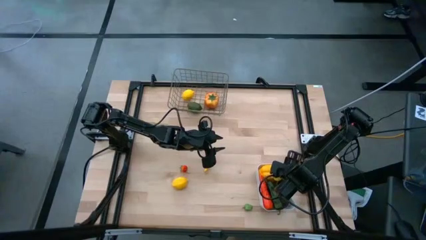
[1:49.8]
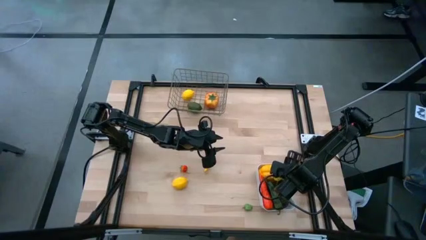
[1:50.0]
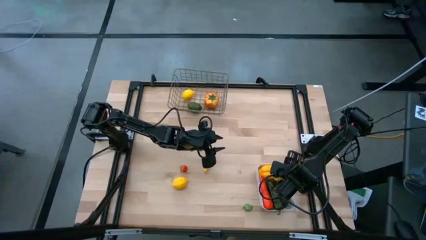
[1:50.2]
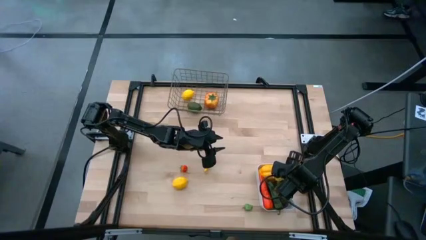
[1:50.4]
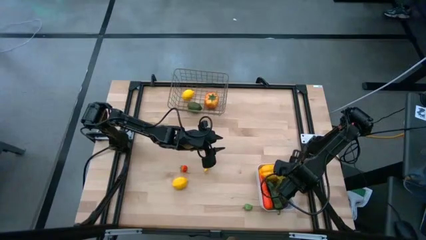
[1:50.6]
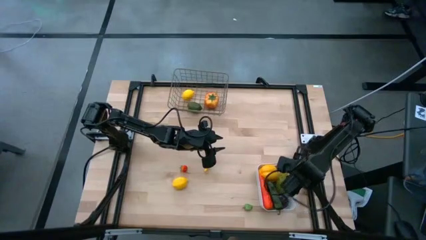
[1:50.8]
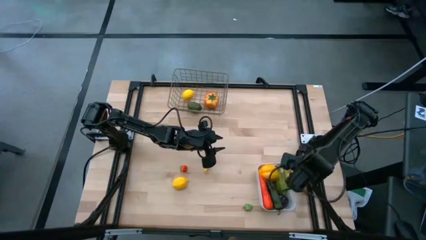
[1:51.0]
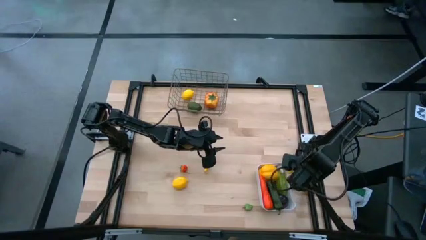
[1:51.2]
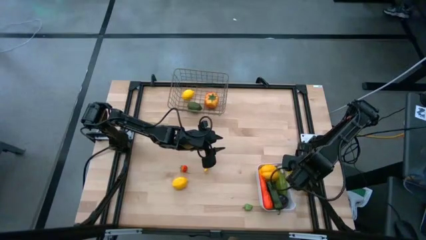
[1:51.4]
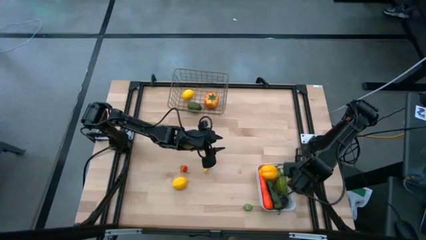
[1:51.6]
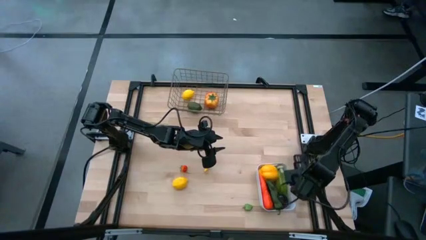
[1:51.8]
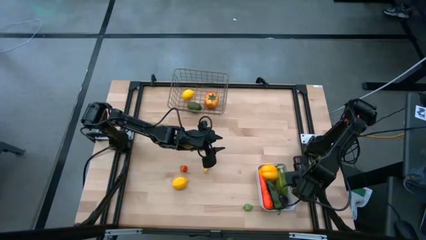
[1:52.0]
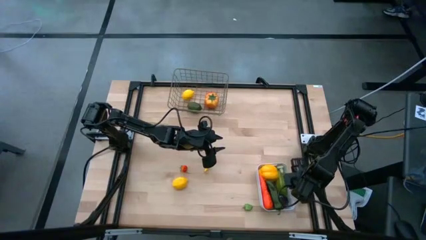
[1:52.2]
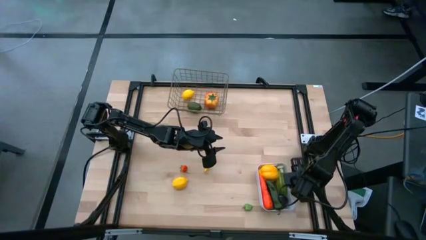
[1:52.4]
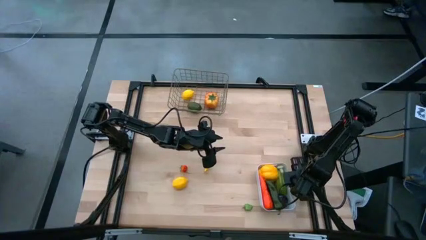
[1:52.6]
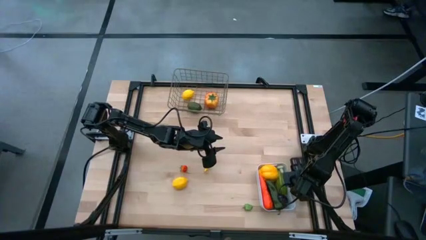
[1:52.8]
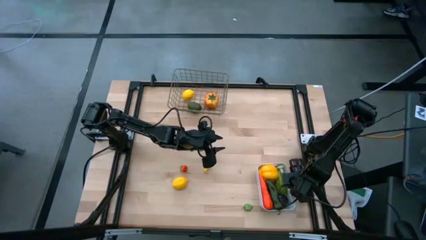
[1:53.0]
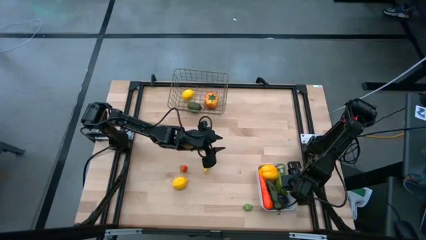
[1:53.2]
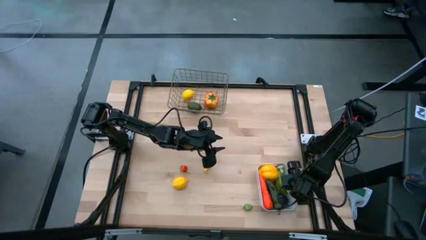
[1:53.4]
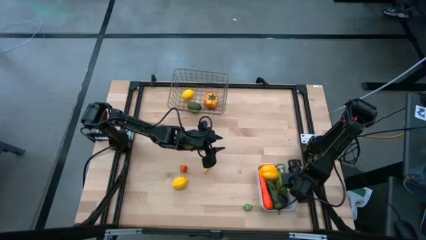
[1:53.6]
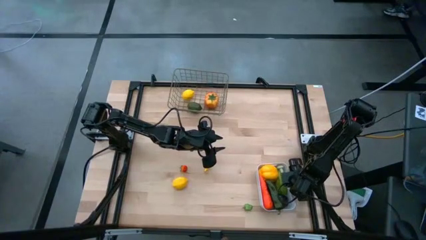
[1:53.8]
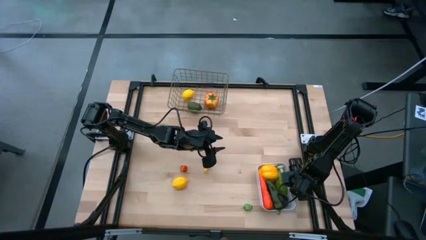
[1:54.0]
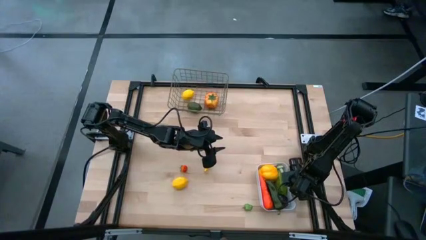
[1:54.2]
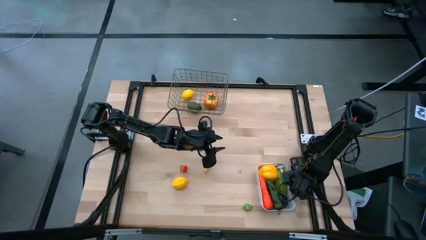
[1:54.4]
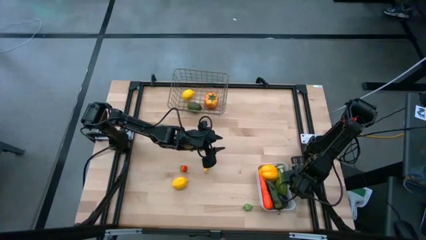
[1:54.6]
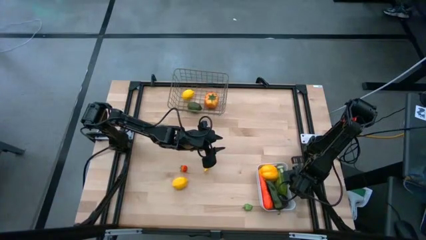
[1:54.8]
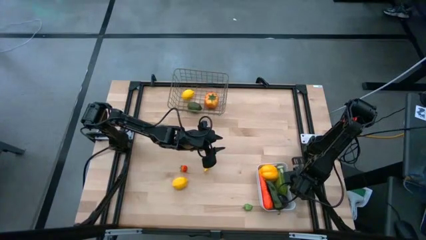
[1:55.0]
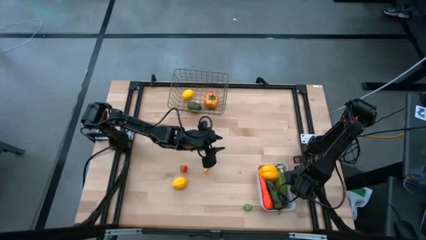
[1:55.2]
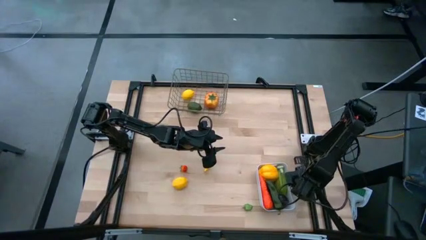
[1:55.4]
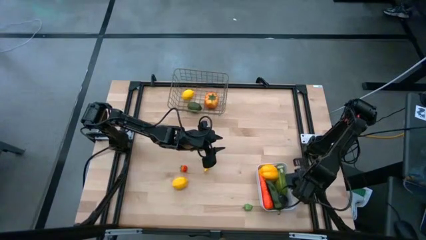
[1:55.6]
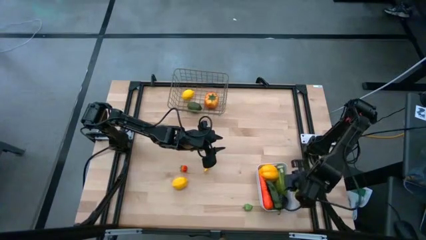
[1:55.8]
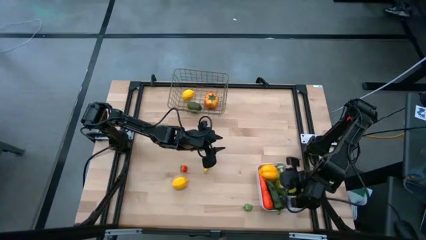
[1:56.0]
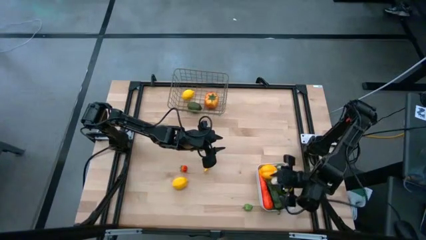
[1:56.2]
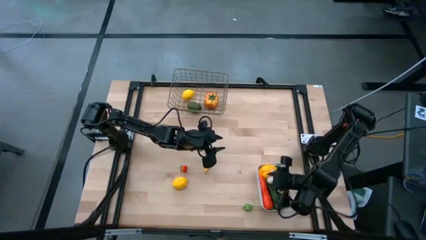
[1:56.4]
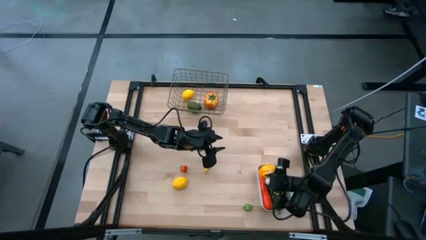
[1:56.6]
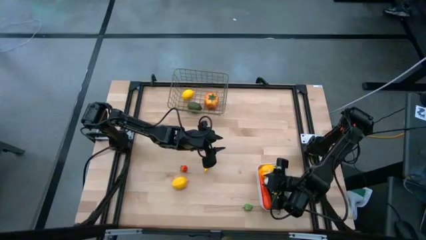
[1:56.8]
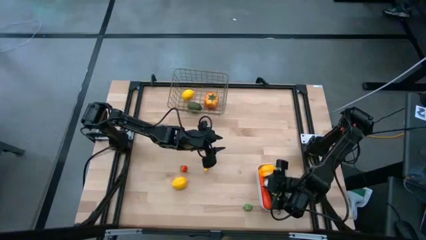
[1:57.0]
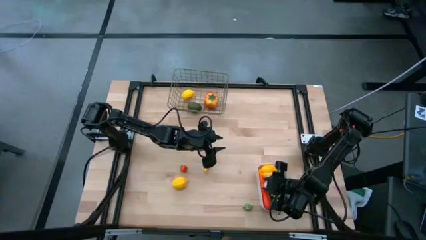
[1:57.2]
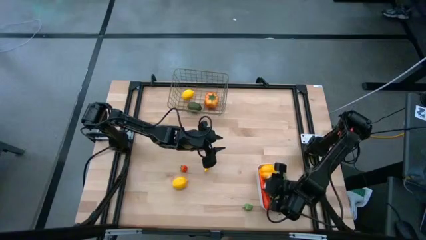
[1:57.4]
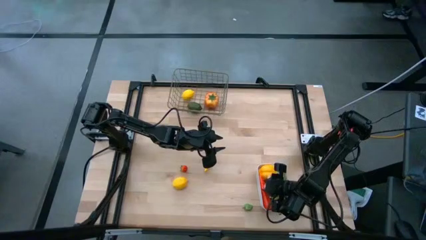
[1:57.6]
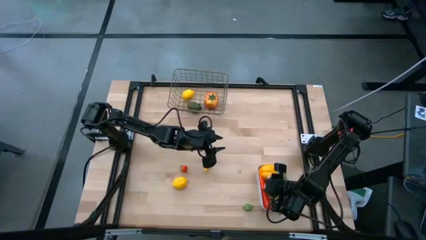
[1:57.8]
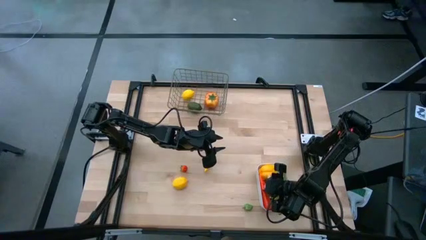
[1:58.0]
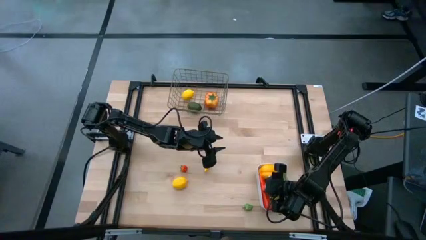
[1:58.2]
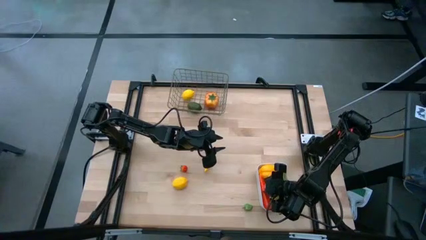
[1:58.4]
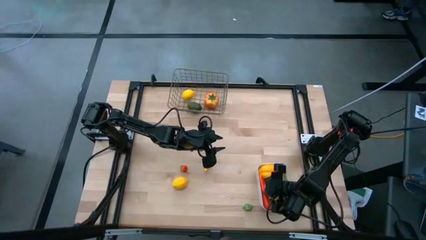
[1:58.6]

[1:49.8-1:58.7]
Task: Sort produce into baskets
Put the garlic into the white bin

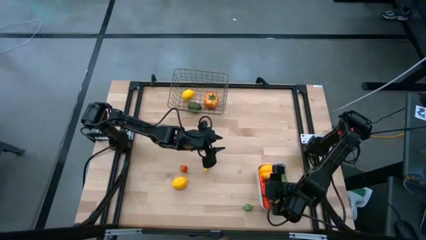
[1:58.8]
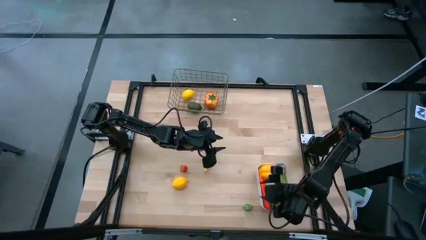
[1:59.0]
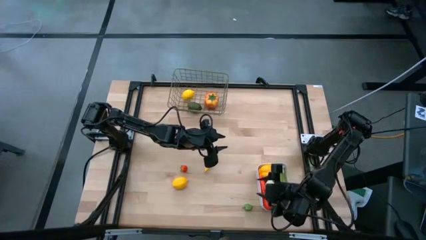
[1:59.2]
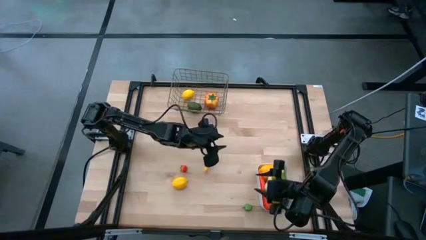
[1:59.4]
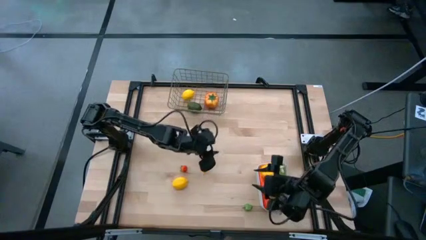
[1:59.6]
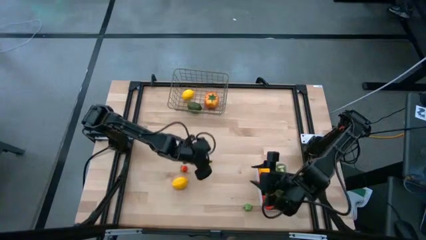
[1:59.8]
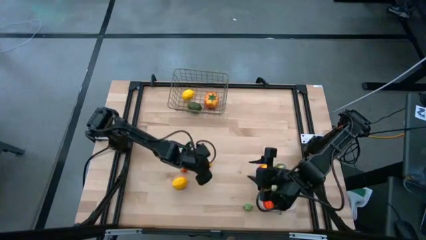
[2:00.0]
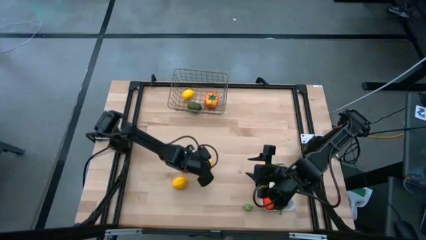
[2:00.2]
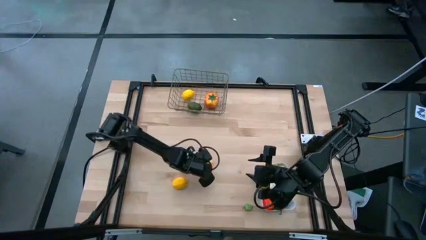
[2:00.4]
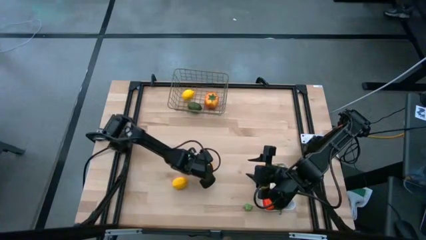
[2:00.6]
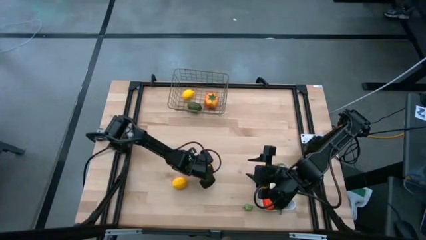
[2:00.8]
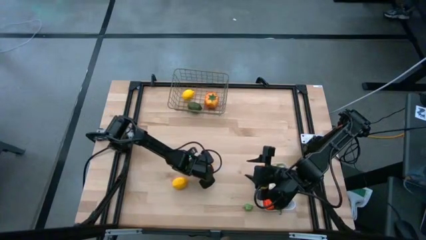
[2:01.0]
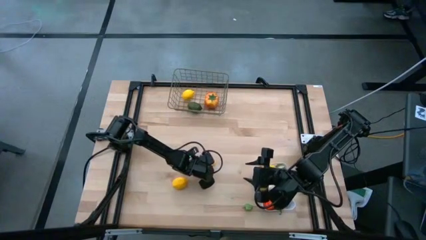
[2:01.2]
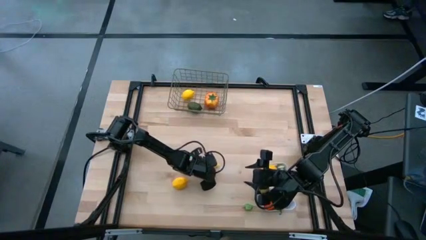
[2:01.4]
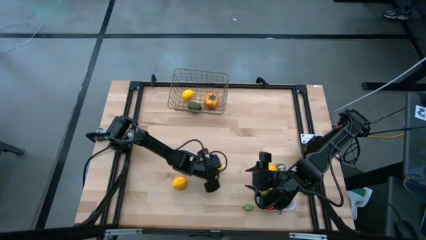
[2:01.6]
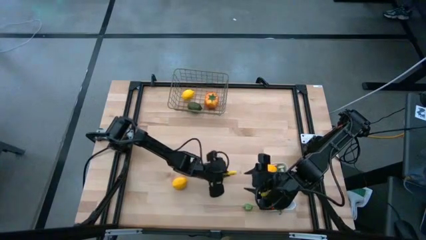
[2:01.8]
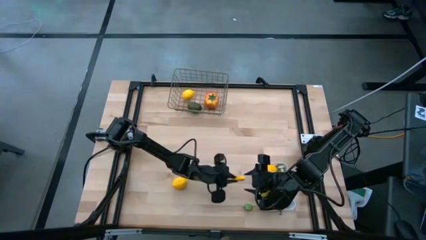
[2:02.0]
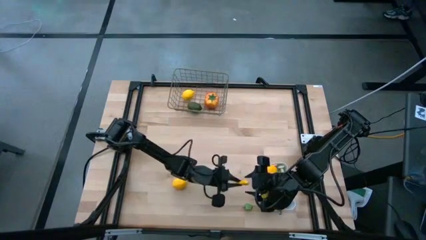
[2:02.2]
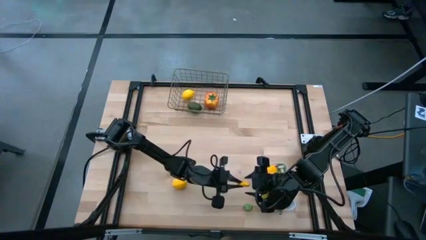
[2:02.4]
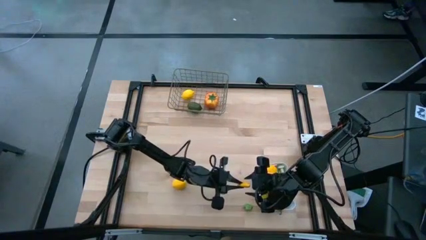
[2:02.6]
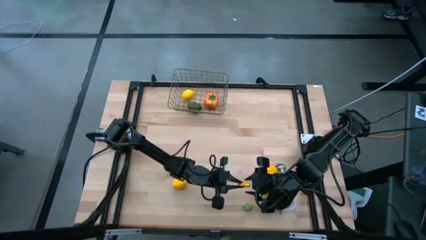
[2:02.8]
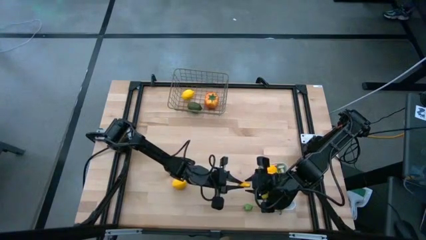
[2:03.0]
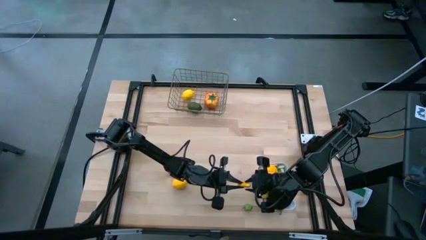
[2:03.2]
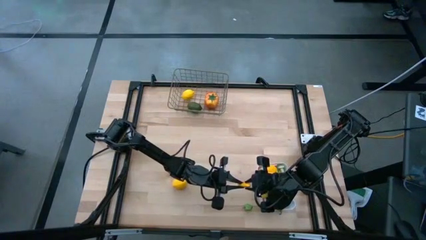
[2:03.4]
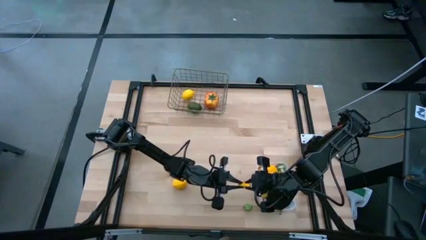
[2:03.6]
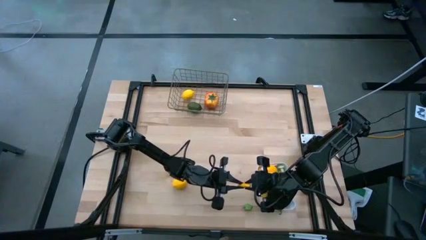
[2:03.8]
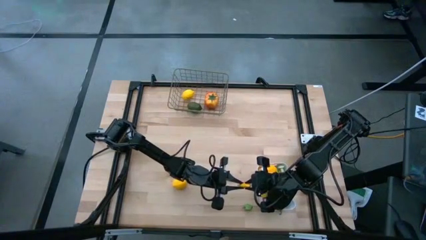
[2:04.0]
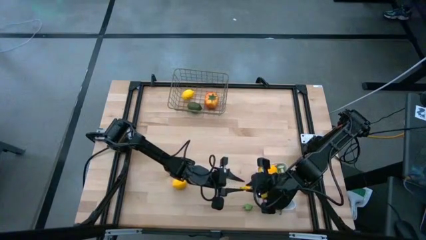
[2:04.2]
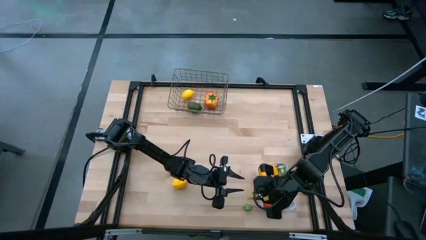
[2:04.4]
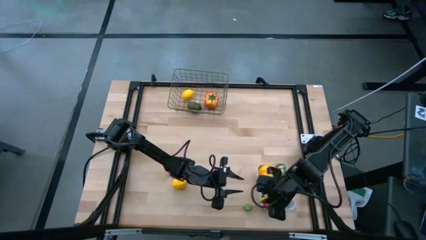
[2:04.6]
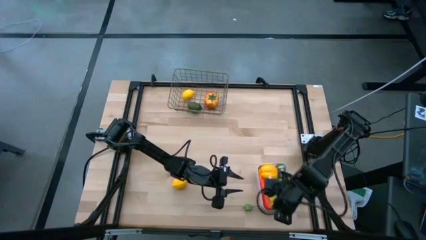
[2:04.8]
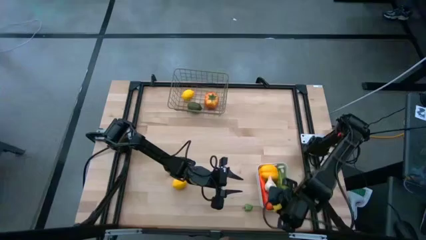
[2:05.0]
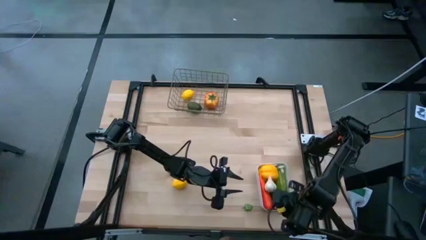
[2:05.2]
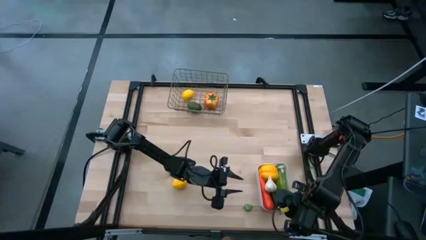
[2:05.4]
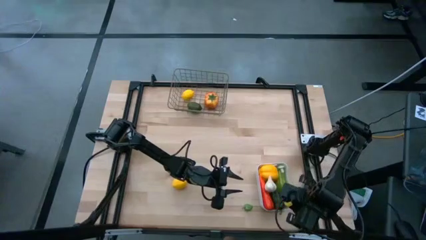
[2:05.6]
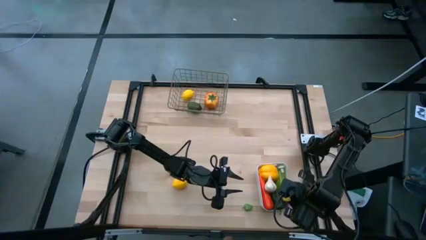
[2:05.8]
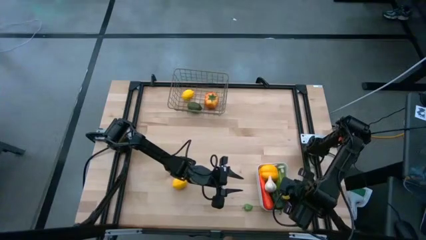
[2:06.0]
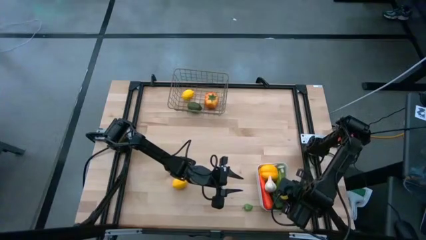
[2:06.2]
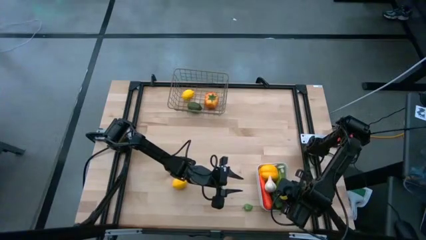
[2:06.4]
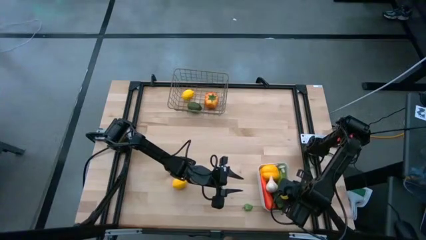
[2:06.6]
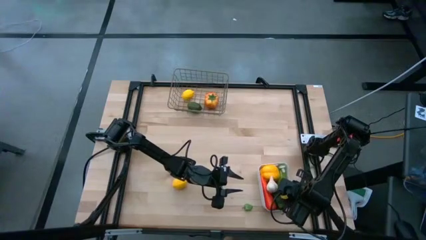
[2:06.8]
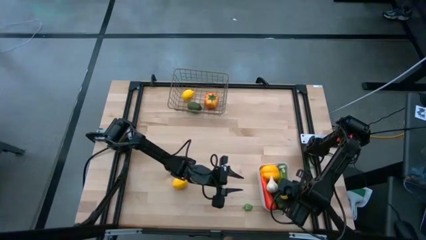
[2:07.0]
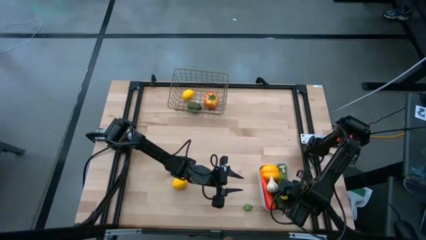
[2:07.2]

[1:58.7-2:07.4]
Put the corn into the white bin
